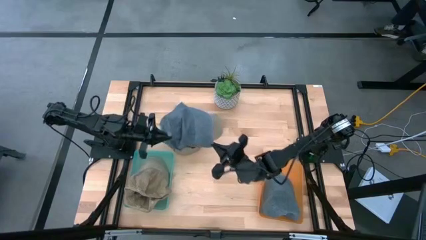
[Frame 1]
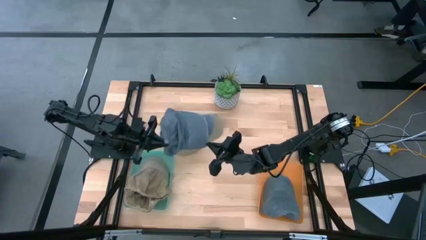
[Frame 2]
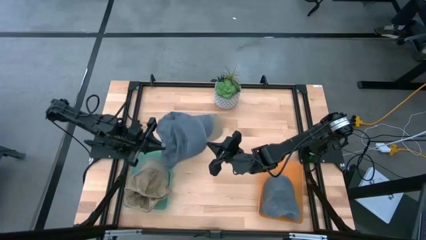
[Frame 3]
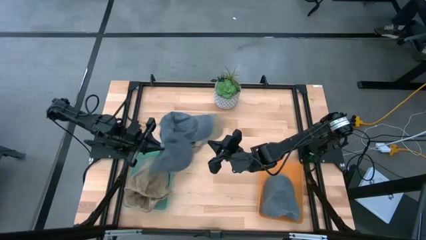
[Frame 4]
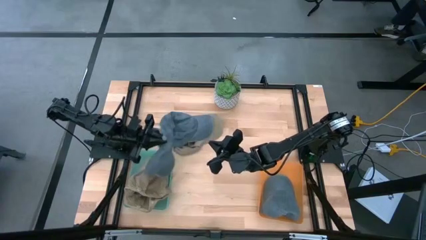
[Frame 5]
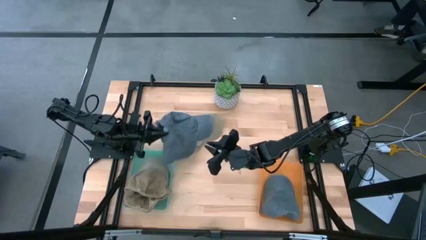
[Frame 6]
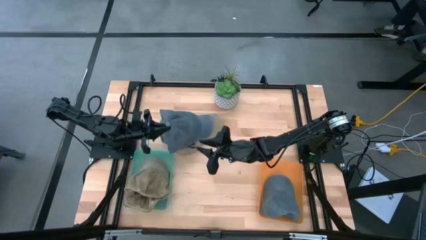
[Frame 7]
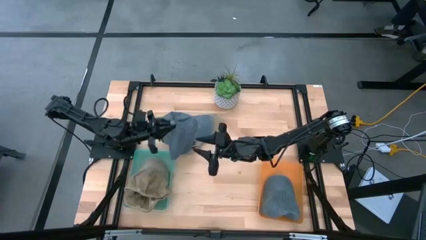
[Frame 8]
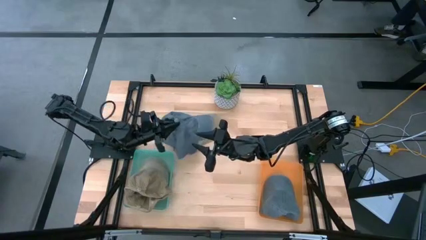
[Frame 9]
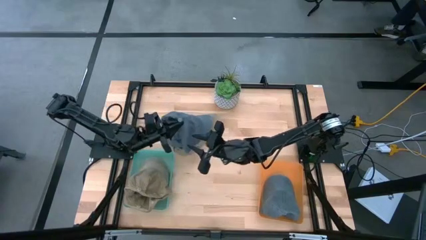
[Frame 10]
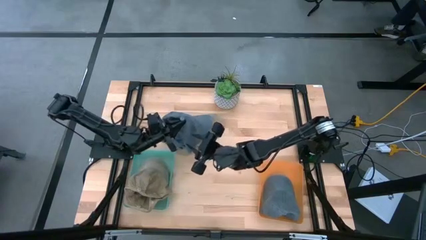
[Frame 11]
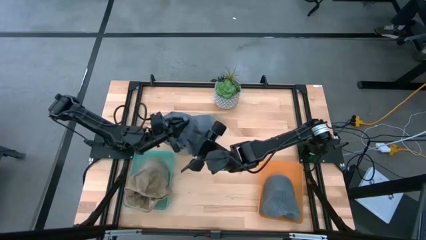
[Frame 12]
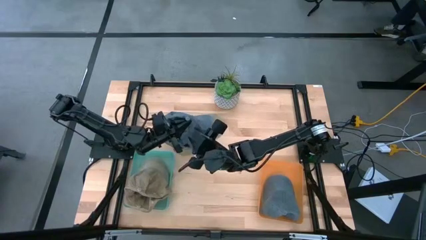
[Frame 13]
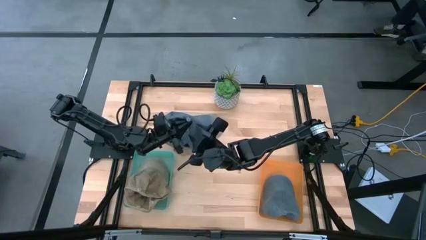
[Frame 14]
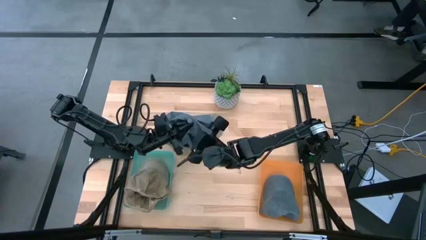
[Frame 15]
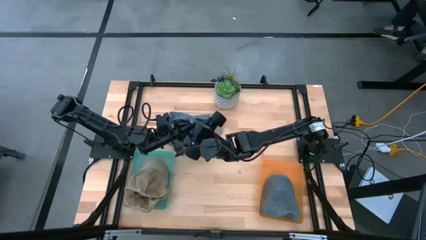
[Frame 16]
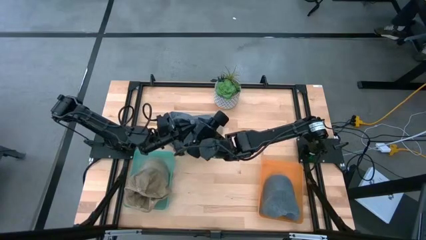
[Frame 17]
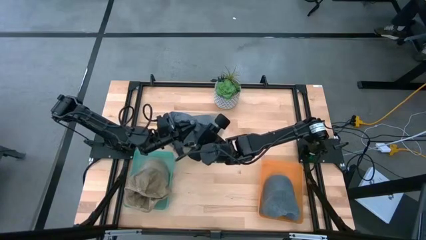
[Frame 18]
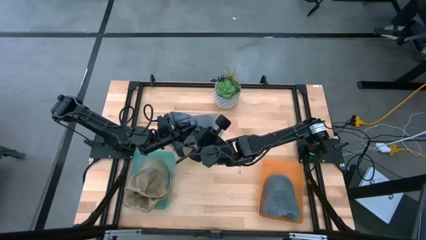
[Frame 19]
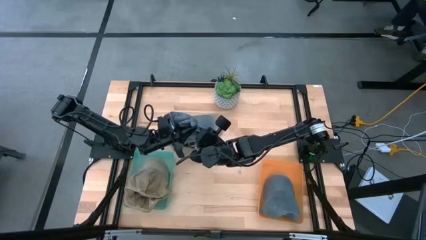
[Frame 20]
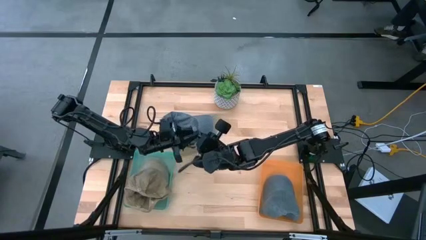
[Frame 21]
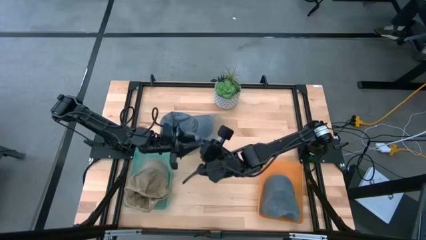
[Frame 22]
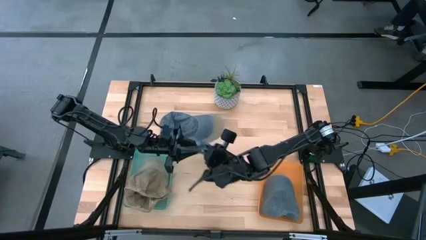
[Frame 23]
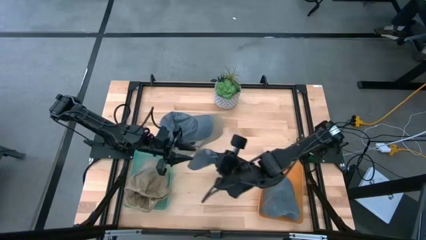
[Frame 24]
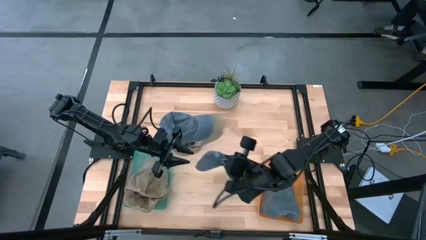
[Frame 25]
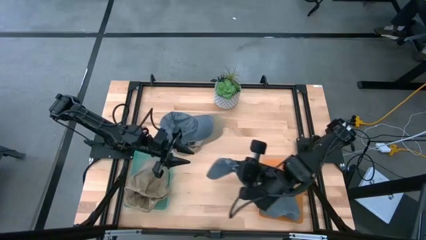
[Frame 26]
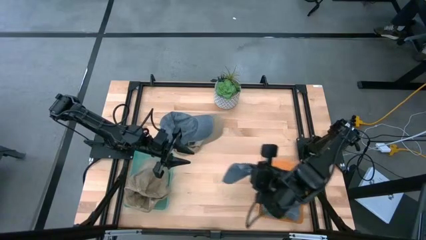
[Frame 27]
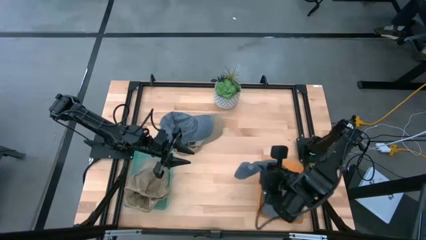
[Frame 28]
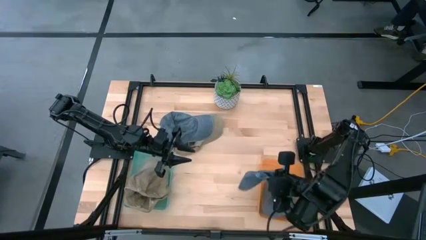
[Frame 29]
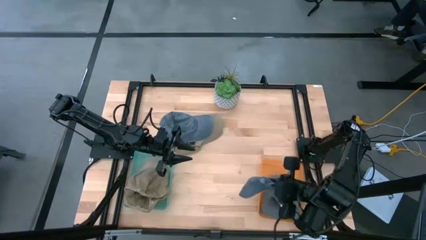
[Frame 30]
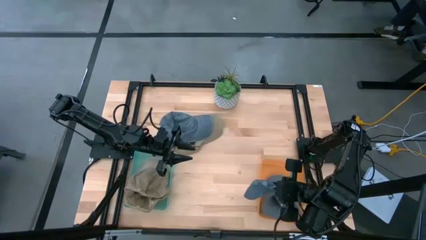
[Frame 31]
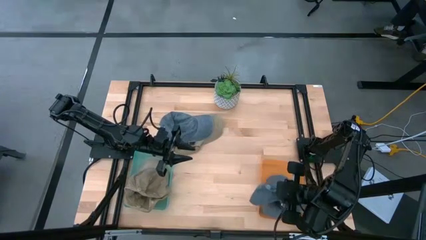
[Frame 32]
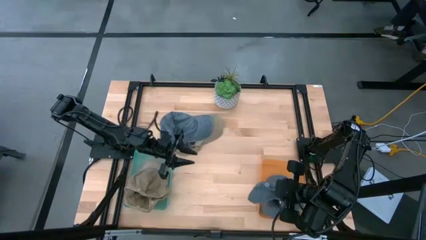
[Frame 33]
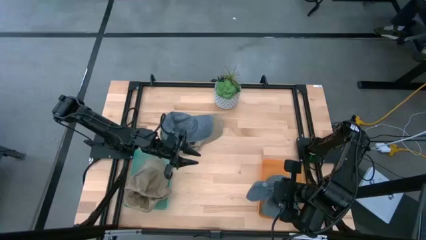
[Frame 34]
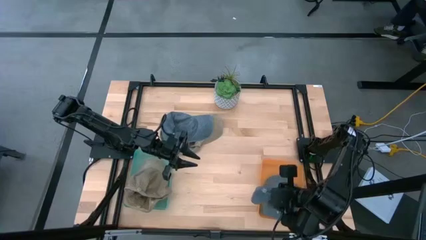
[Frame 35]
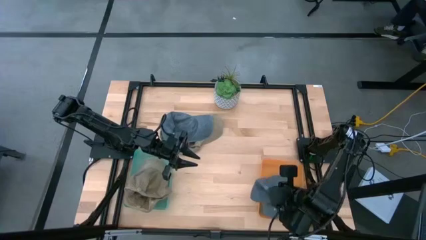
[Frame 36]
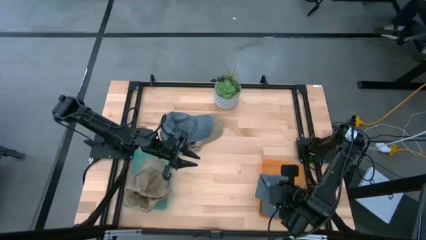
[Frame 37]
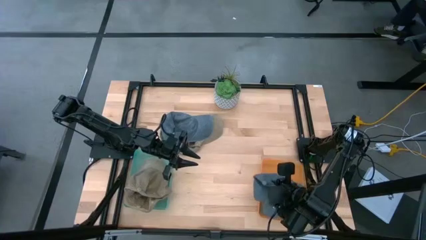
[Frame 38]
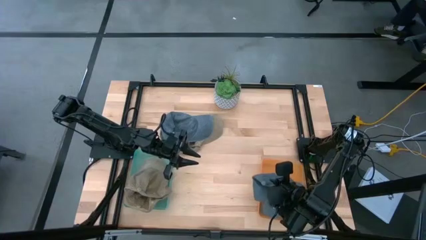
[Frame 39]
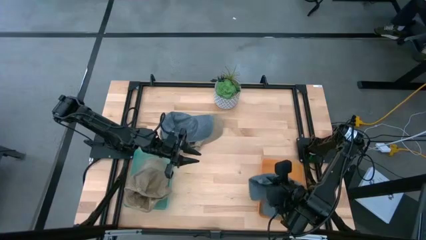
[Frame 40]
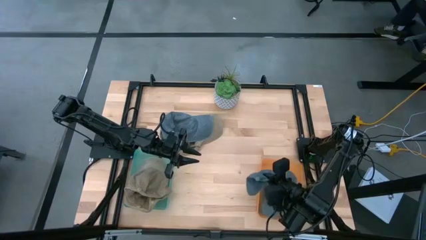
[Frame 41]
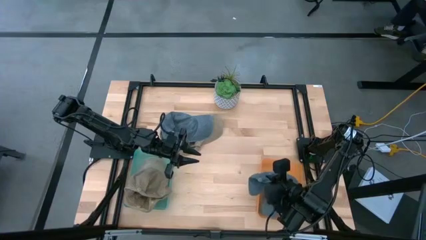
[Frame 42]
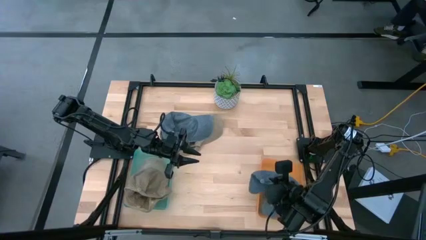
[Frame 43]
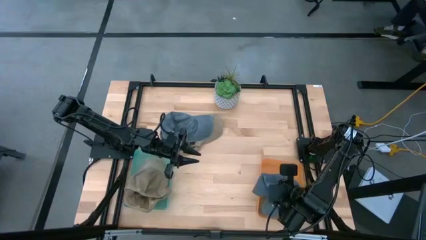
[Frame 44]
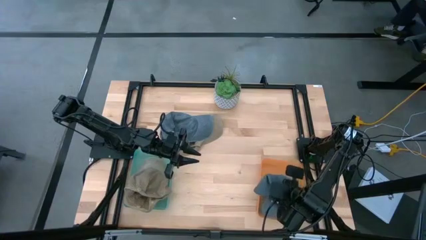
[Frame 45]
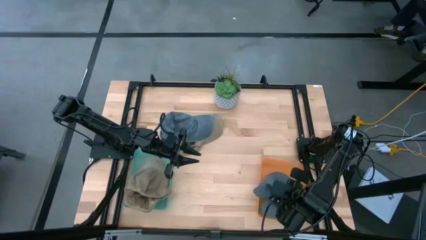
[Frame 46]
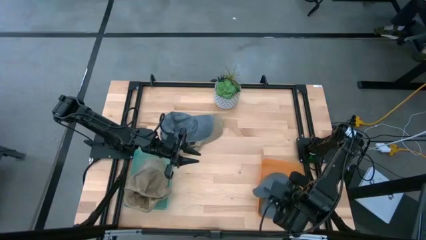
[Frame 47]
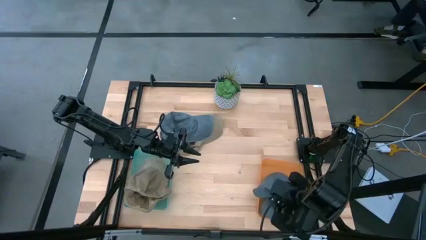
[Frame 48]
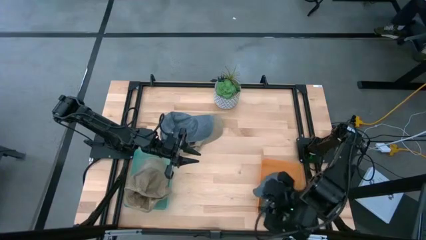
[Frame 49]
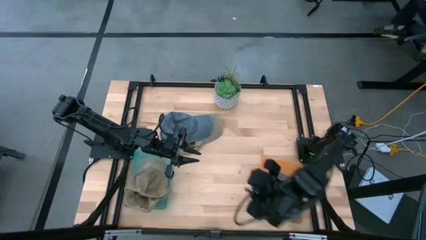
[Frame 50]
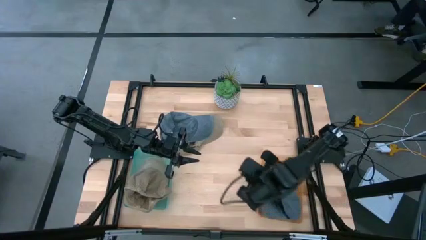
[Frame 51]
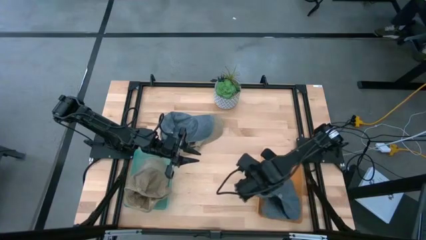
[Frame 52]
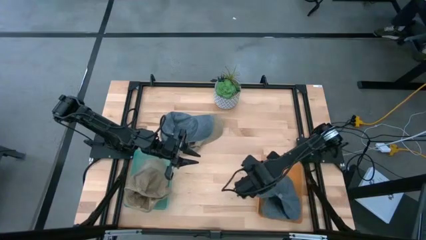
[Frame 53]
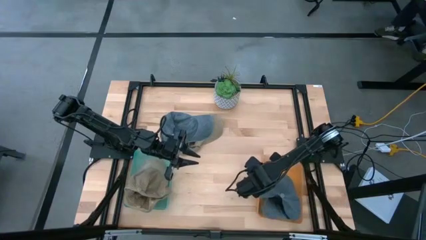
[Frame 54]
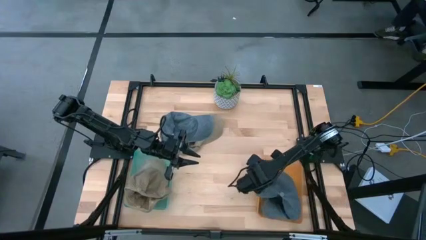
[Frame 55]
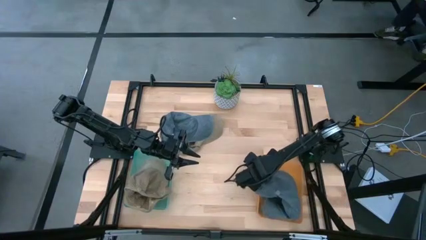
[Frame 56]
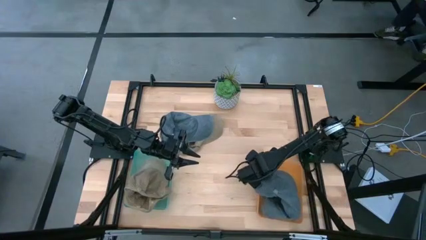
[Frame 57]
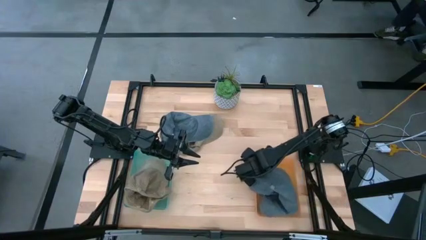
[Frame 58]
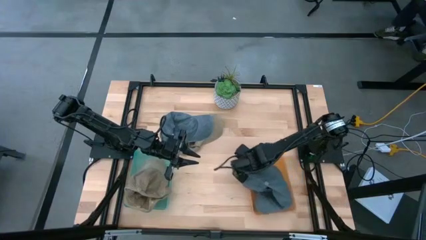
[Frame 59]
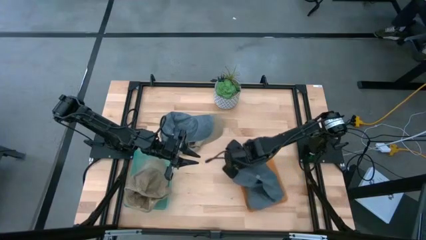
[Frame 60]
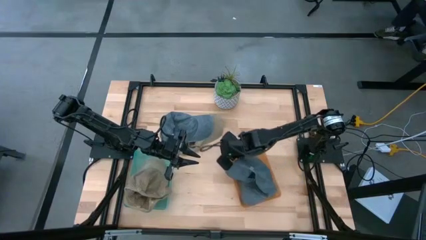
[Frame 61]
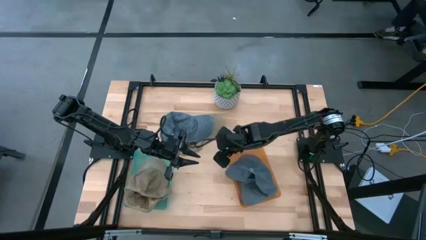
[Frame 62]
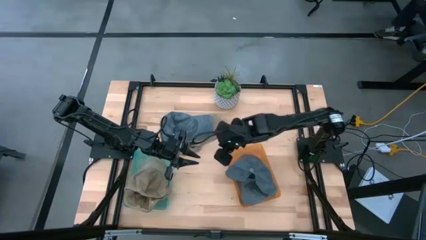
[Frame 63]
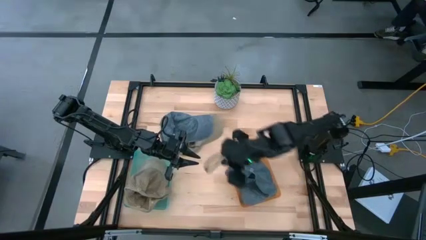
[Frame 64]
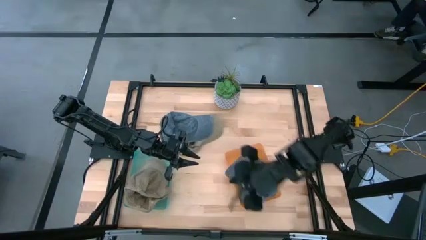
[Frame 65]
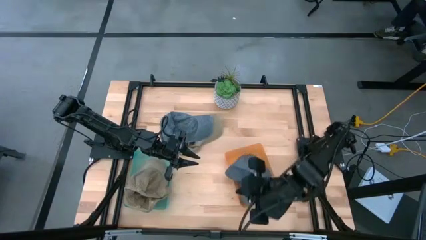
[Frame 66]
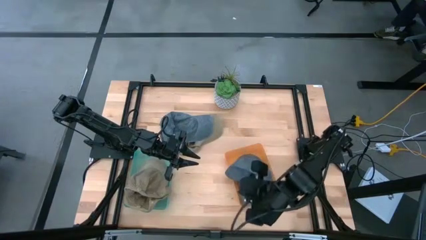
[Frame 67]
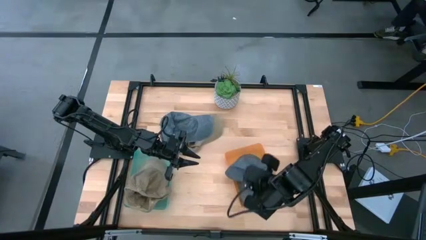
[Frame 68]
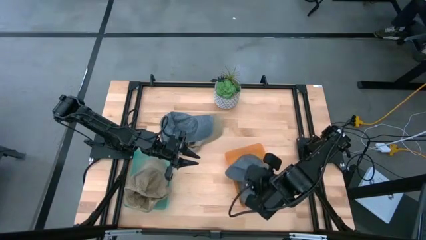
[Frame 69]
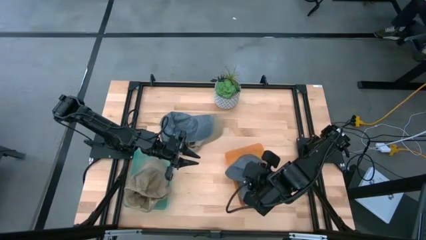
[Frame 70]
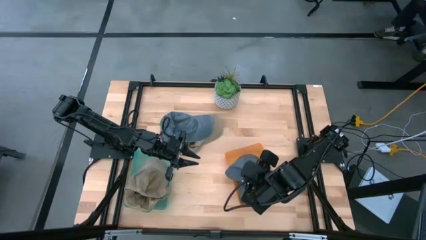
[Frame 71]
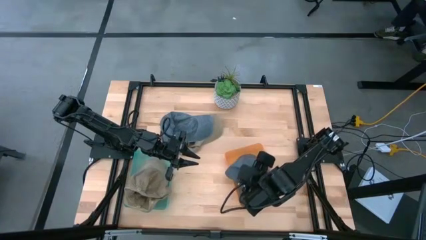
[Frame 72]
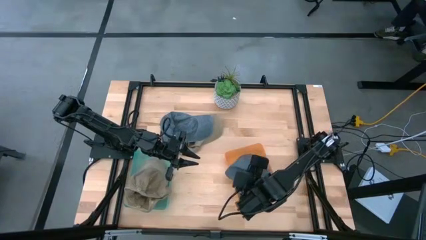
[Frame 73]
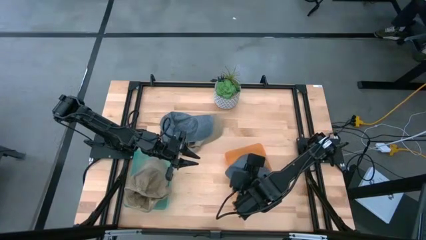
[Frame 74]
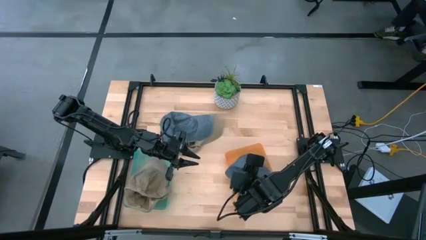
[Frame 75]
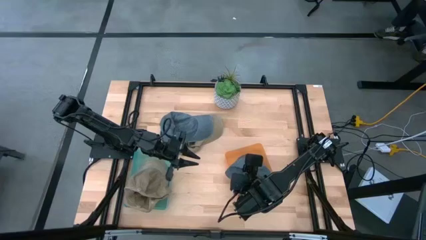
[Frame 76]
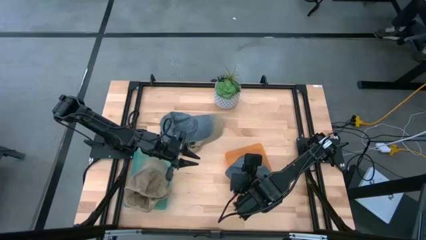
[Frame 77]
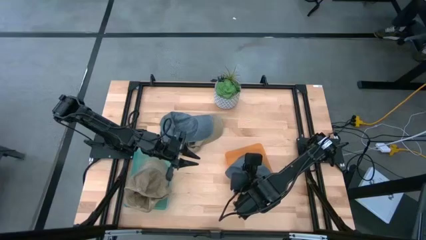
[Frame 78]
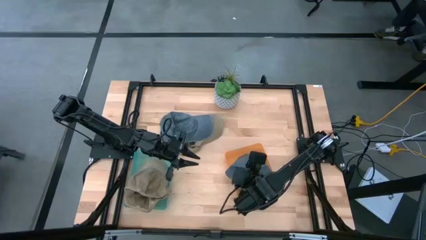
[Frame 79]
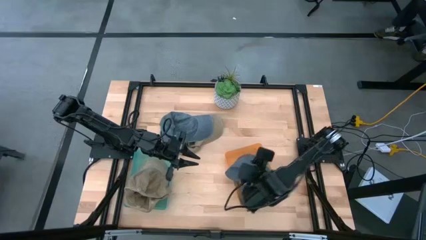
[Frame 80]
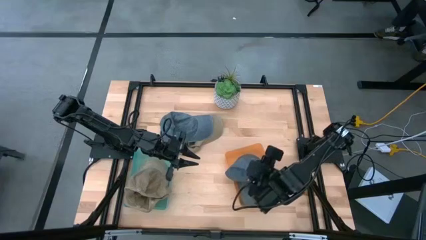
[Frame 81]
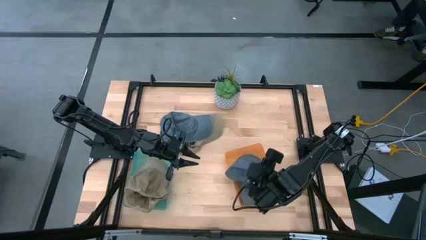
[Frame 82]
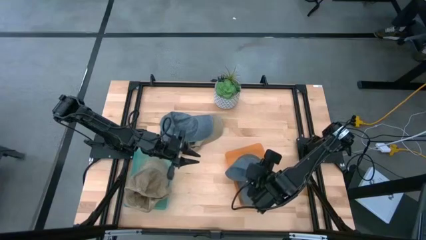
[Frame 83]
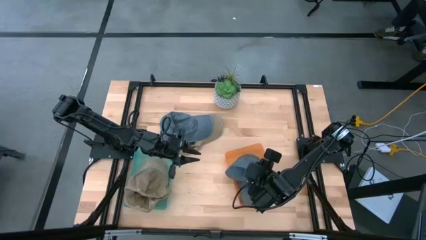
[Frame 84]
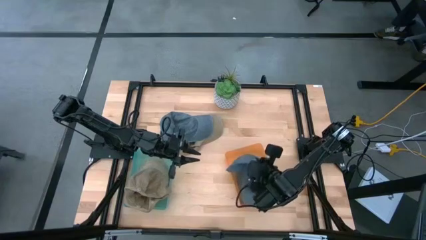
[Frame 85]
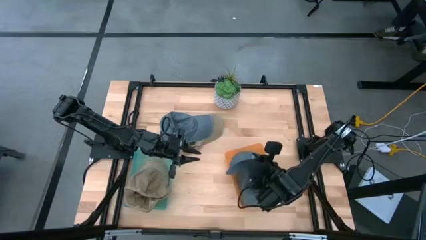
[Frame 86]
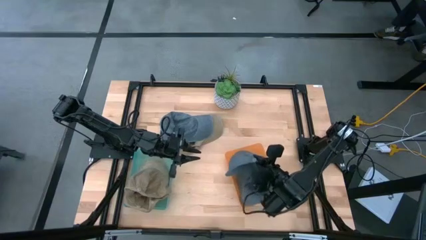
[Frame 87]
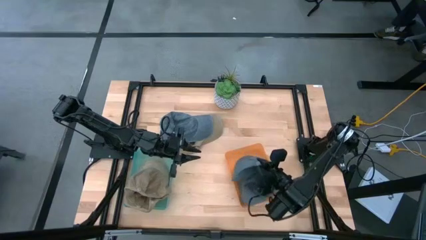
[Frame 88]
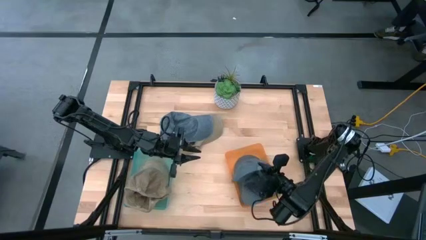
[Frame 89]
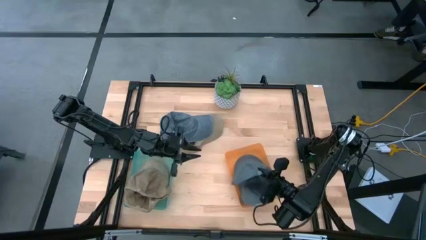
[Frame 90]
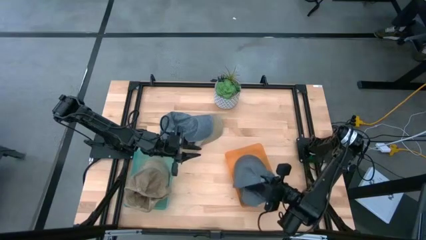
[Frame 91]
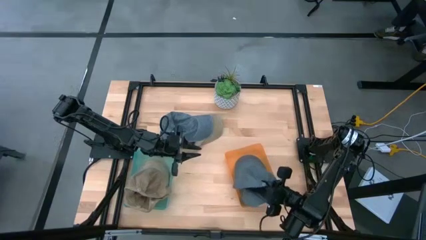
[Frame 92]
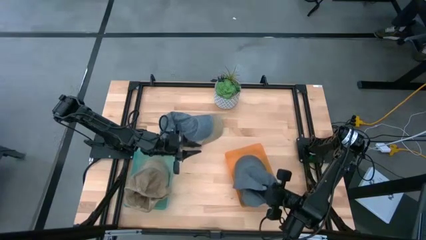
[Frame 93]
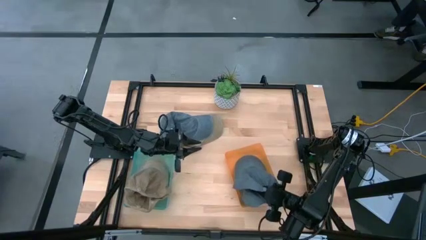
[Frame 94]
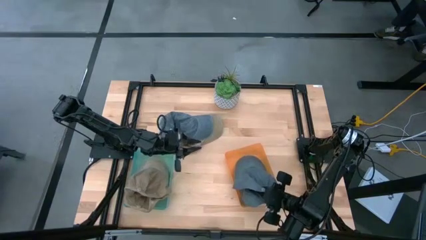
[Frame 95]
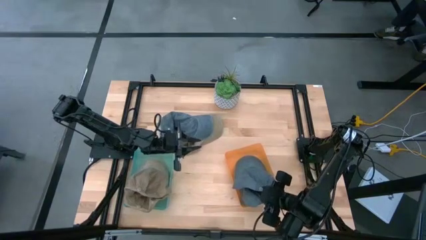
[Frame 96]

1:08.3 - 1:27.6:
Task: Pick & Place hat
Put the blue cap into the orange bin
